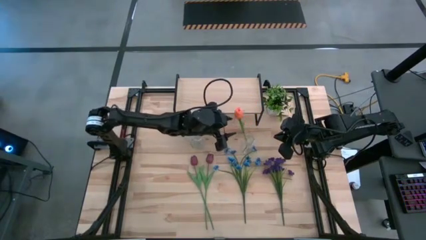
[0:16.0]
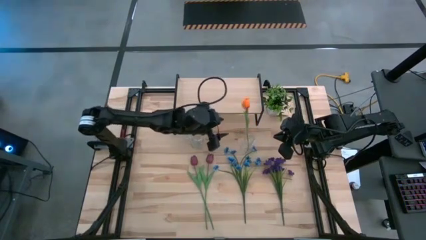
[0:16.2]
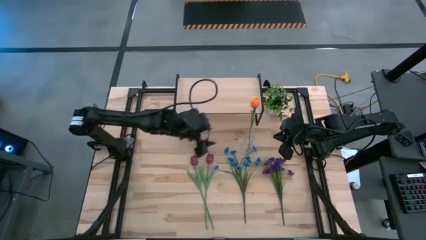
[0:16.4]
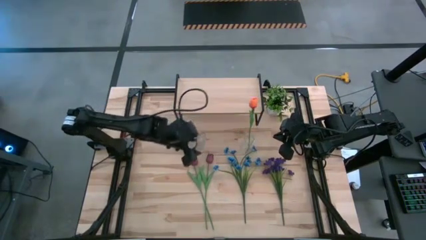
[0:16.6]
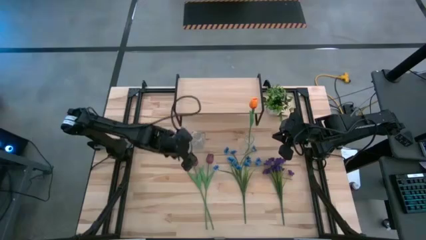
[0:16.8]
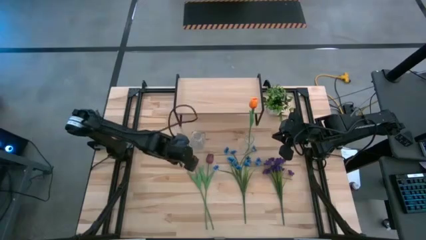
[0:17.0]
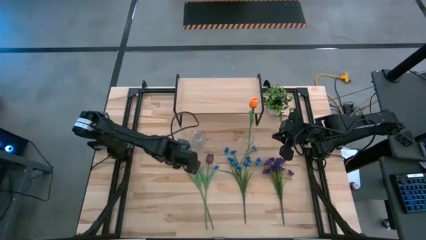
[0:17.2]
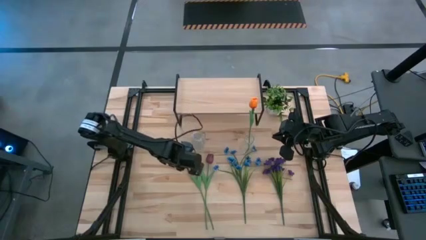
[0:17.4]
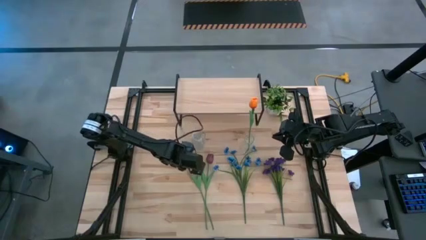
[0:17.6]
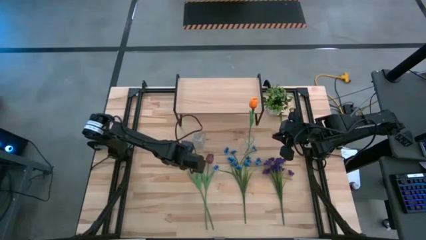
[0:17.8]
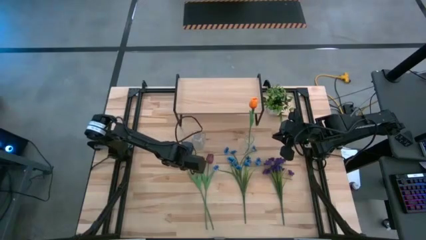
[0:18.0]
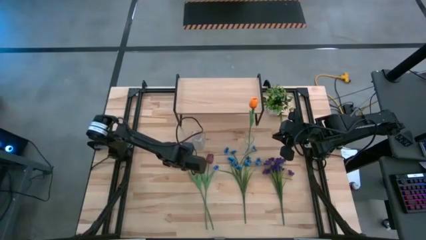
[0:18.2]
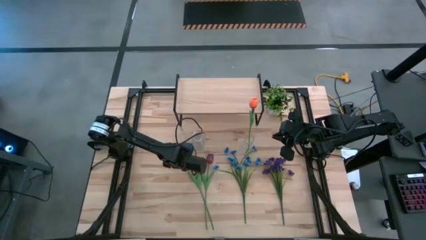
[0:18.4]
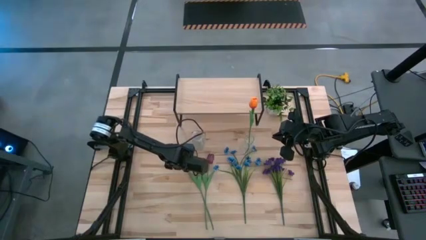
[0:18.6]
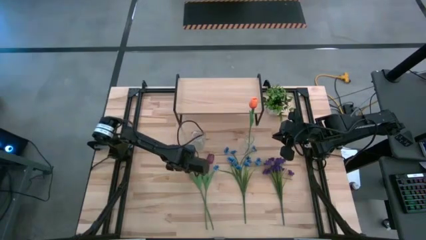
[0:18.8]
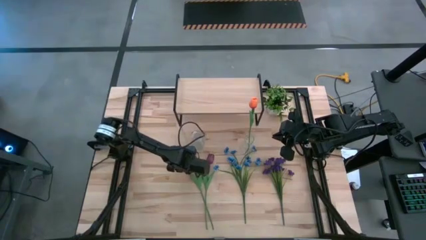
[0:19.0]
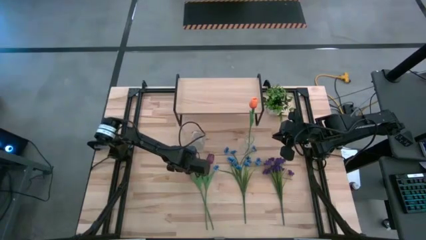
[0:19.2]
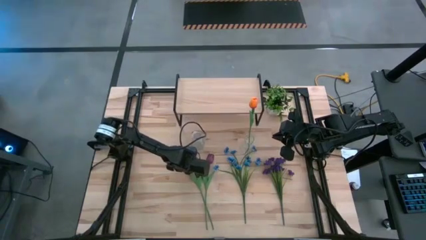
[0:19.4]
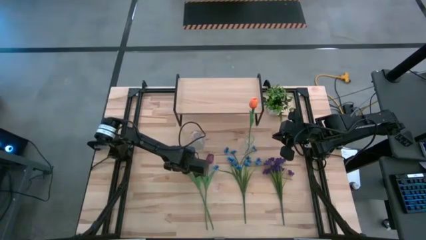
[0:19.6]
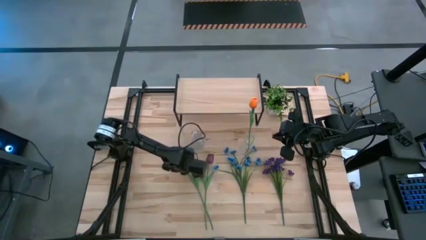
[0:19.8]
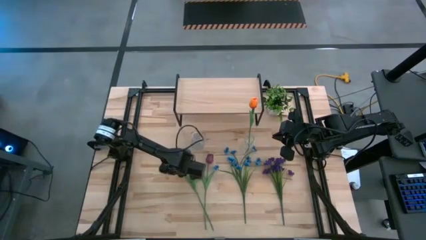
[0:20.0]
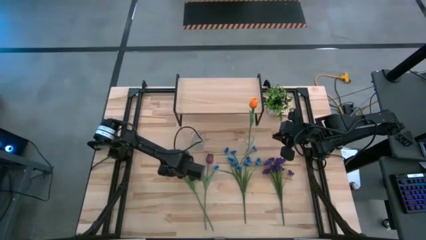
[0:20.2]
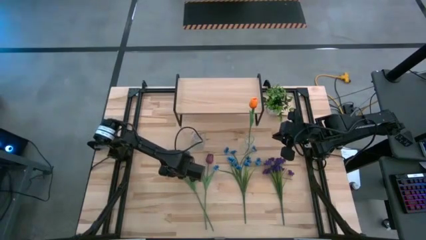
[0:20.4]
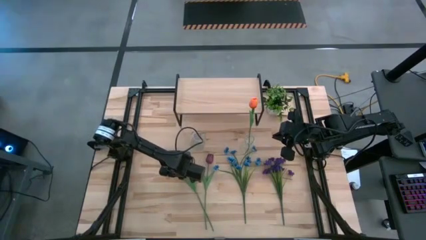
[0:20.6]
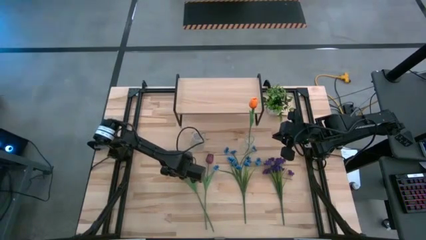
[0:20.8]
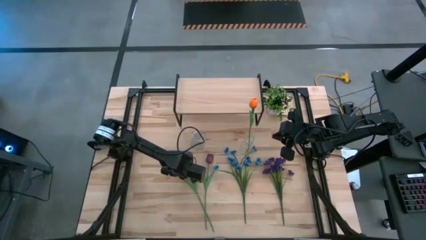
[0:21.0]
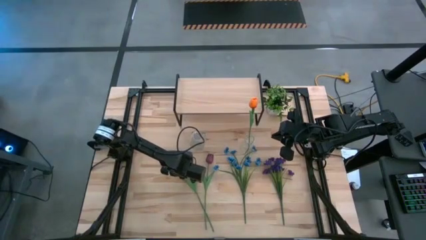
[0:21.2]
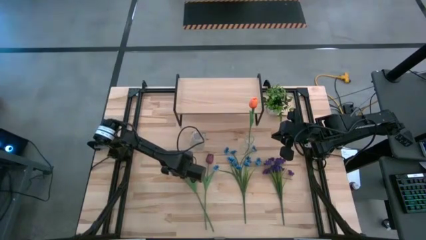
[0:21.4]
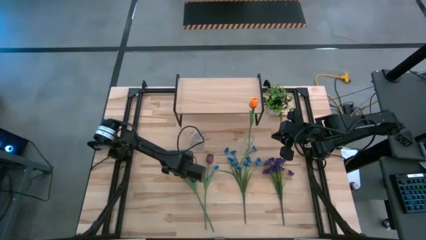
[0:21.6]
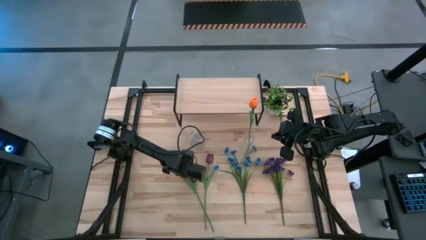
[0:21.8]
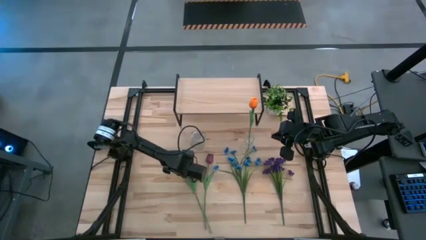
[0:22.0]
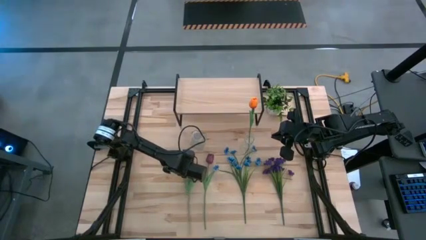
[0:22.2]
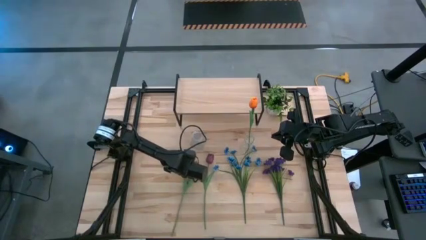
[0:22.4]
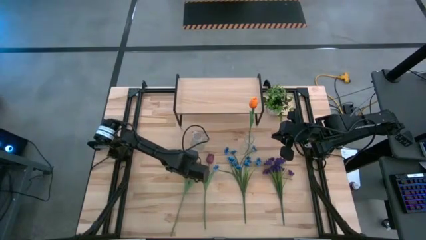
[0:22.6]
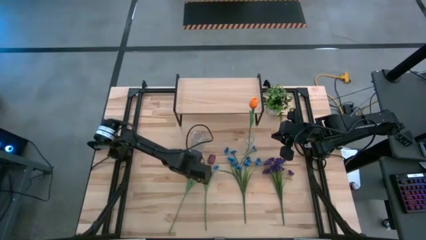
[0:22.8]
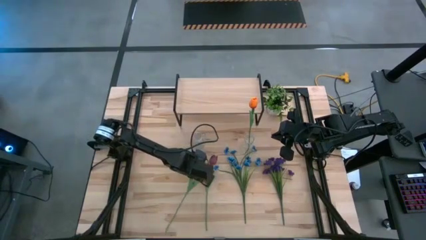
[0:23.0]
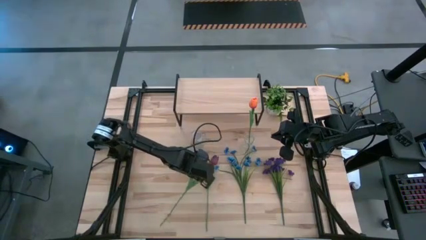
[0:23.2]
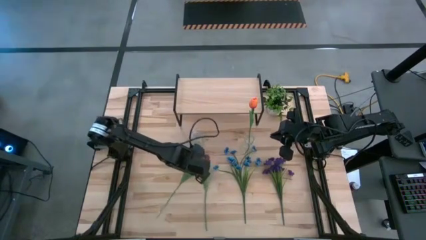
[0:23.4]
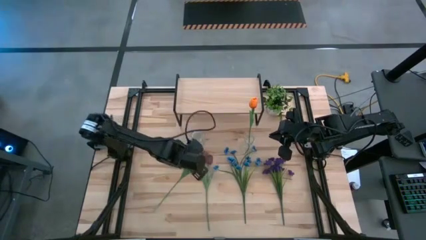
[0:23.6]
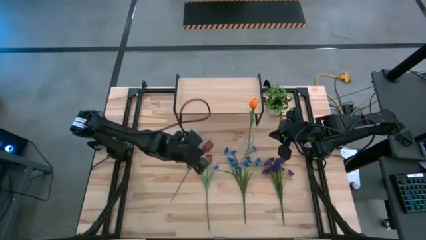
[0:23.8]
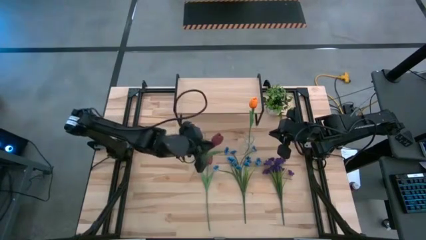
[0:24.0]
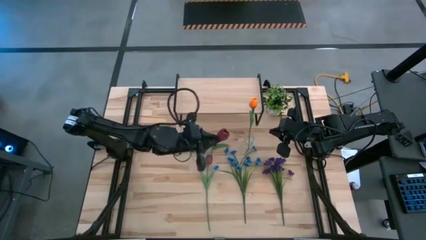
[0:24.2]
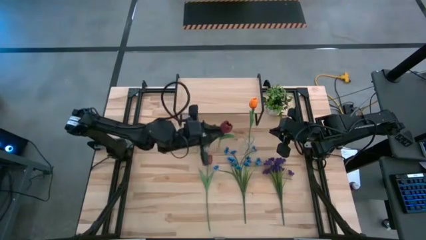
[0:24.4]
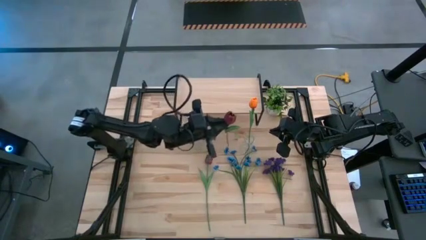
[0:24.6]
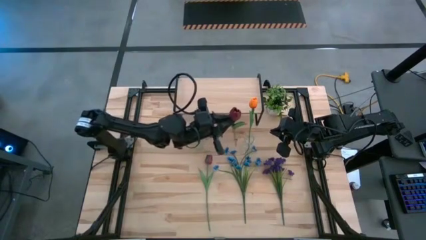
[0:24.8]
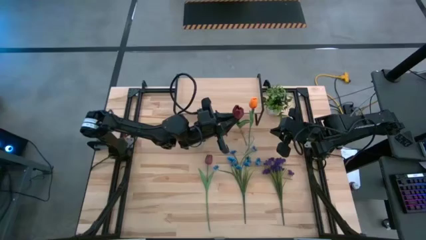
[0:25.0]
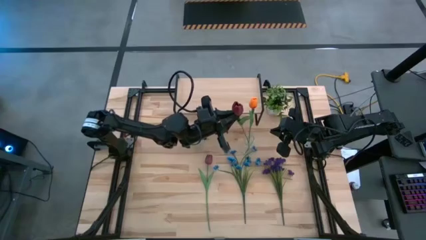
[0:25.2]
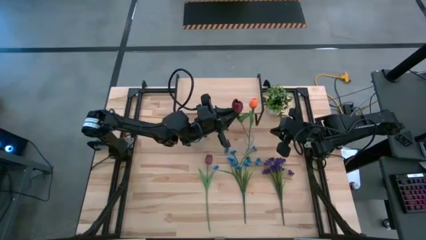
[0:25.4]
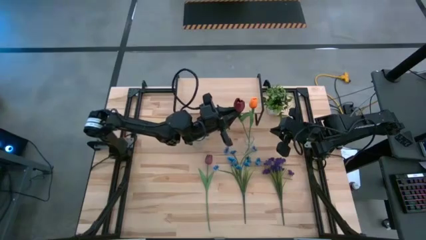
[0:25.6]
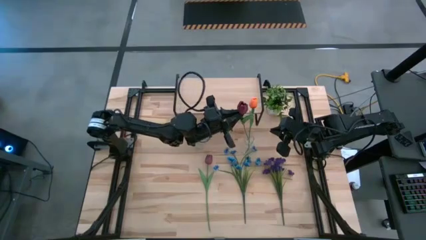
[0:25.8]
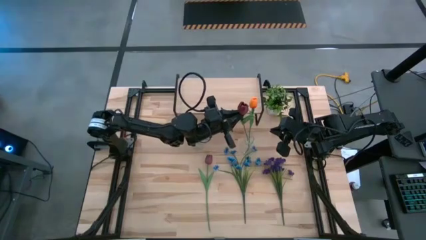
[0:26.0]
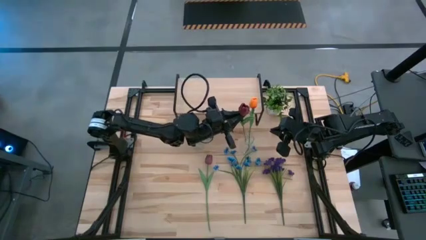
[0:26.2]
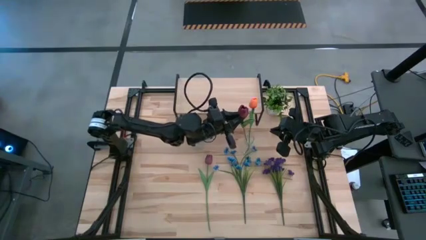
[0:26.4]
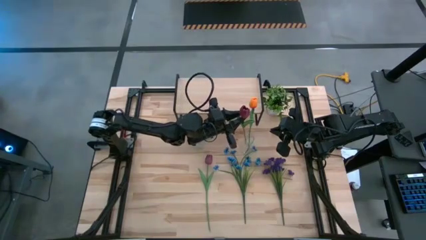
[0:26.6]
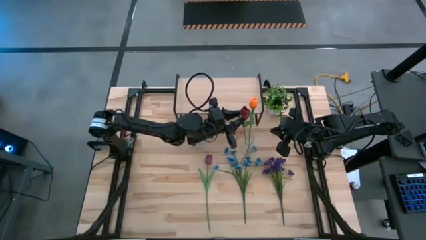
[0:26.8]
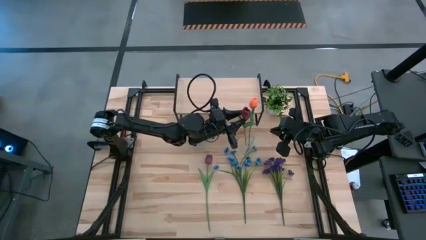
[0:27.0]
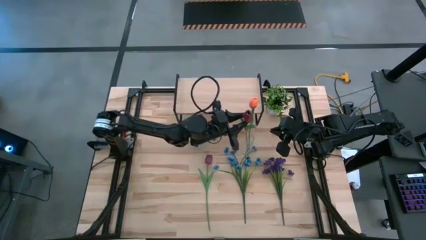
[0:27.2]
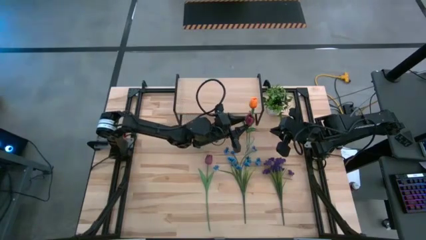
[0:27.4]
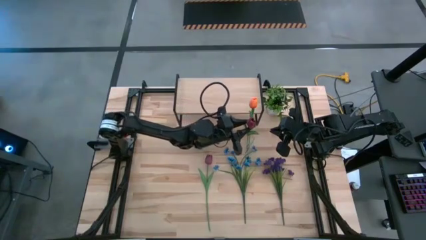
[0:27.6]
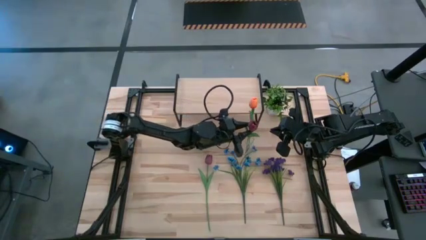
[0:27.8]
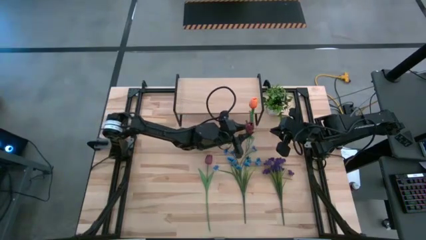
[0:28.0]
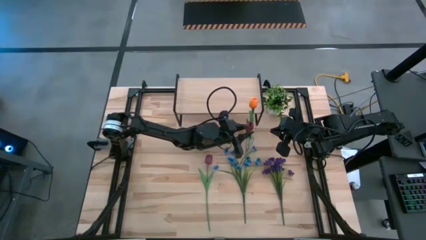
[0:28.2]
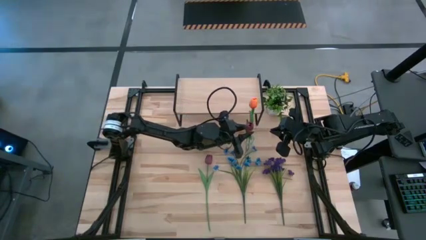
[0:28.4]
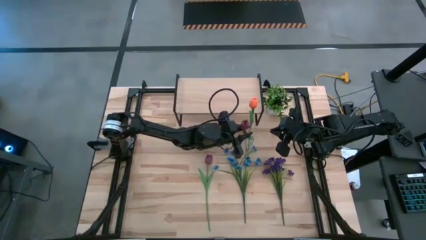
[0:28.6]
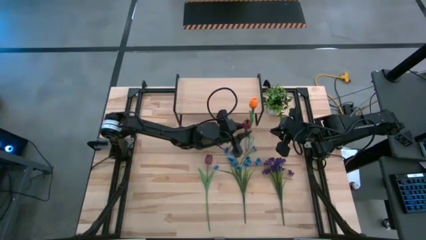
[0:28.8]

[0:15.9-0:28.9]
Task: Pick and place flowers into a vace then onto a shelf
Put the left red flower into the right transparent vase
